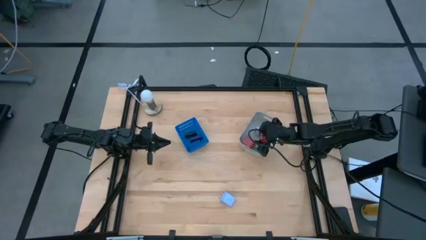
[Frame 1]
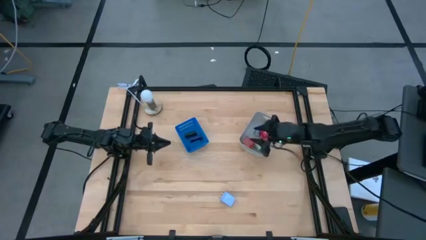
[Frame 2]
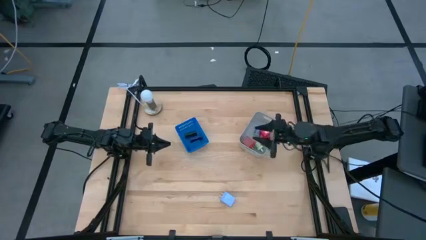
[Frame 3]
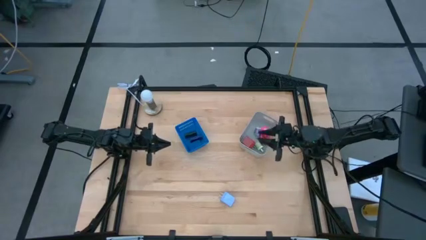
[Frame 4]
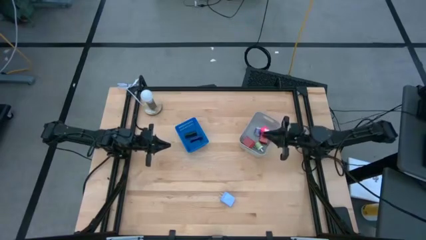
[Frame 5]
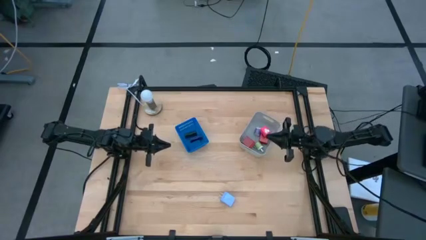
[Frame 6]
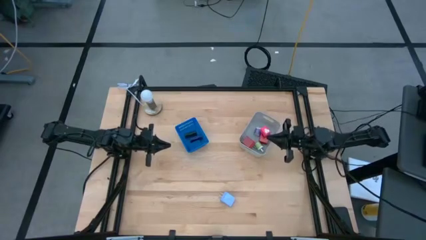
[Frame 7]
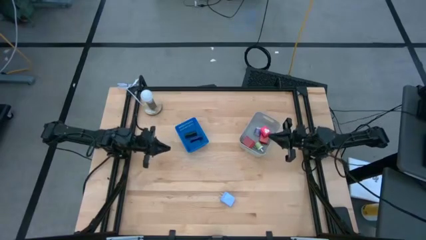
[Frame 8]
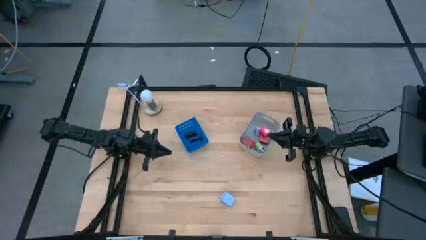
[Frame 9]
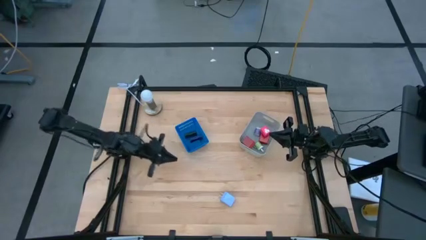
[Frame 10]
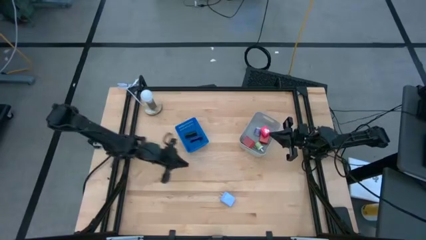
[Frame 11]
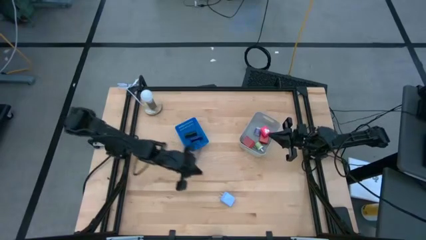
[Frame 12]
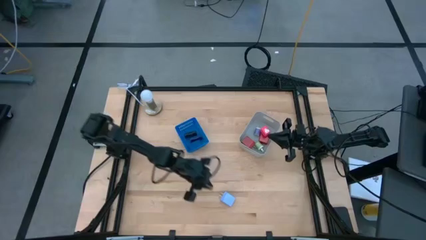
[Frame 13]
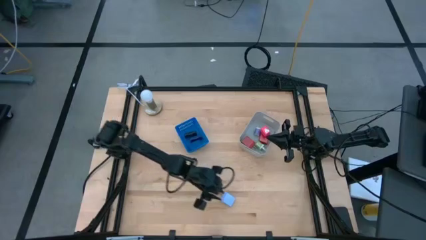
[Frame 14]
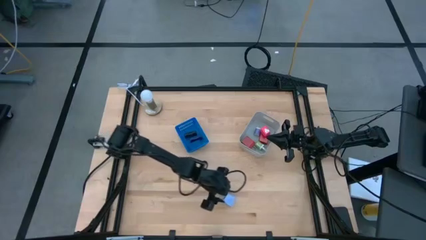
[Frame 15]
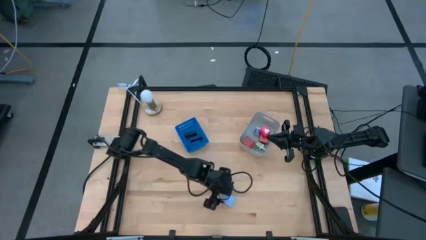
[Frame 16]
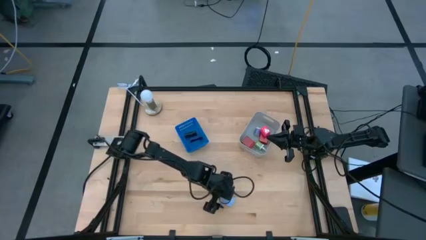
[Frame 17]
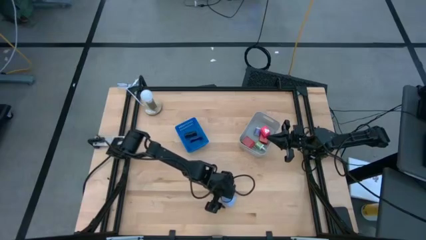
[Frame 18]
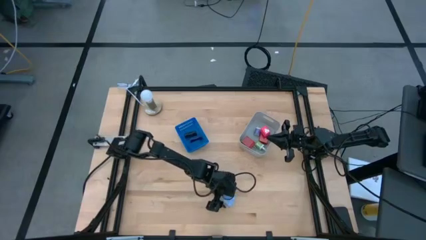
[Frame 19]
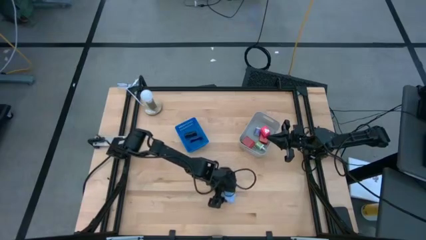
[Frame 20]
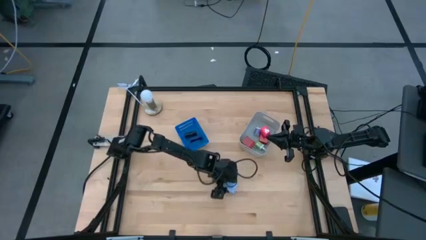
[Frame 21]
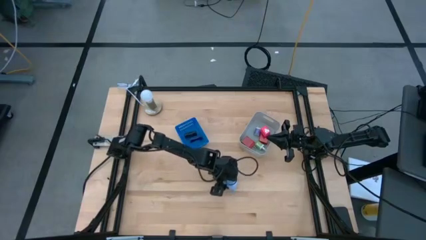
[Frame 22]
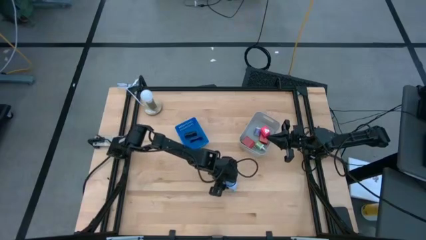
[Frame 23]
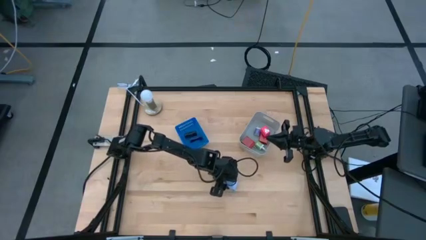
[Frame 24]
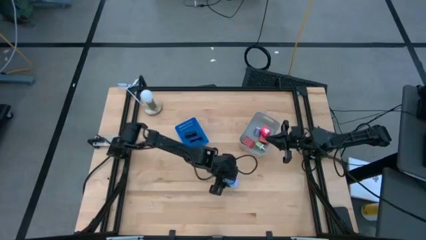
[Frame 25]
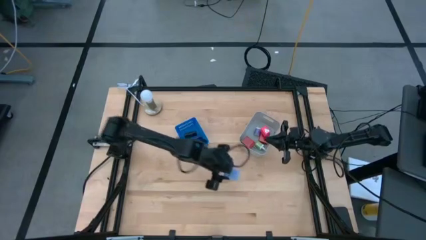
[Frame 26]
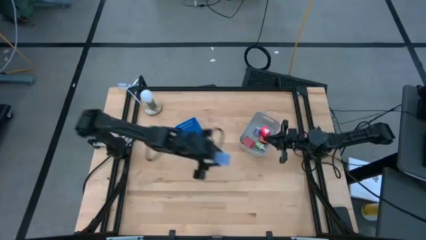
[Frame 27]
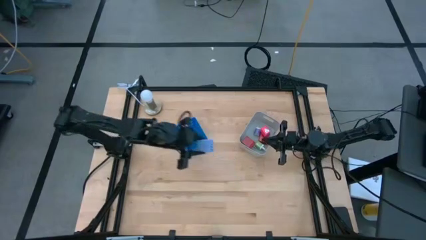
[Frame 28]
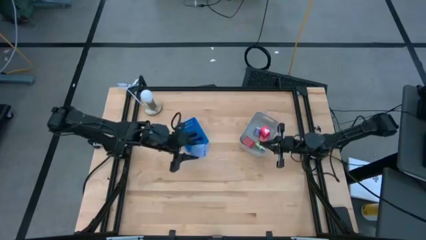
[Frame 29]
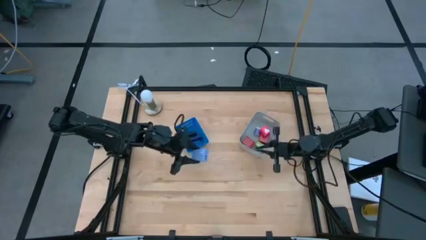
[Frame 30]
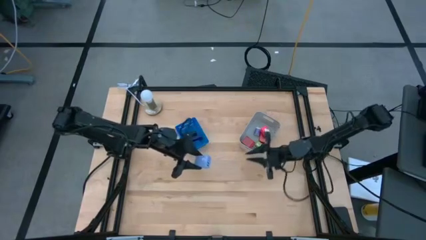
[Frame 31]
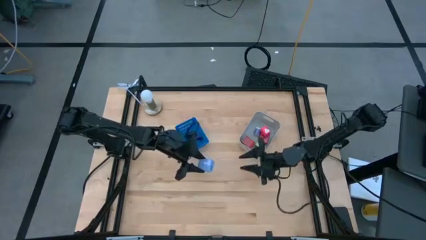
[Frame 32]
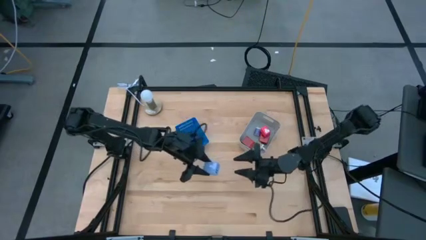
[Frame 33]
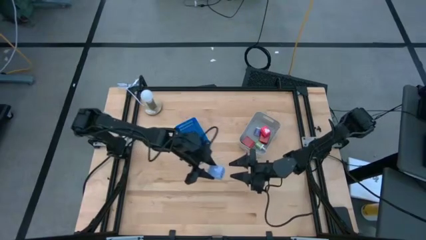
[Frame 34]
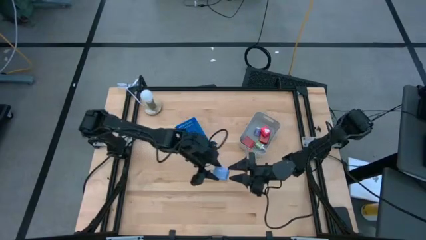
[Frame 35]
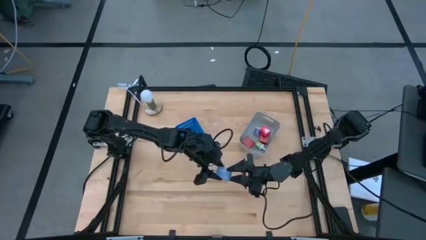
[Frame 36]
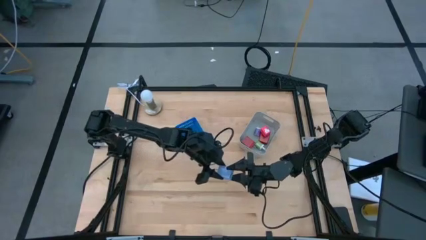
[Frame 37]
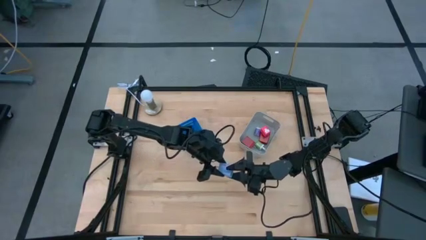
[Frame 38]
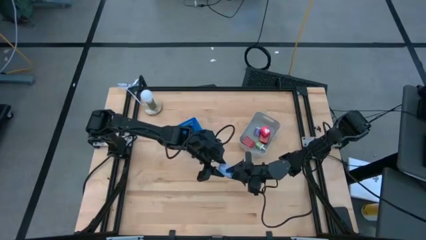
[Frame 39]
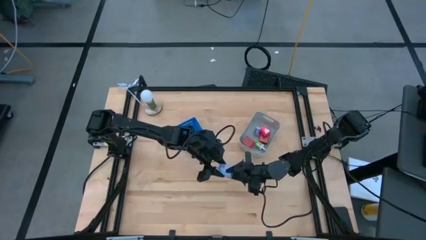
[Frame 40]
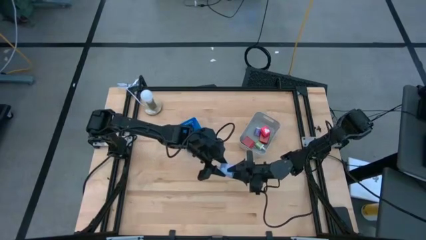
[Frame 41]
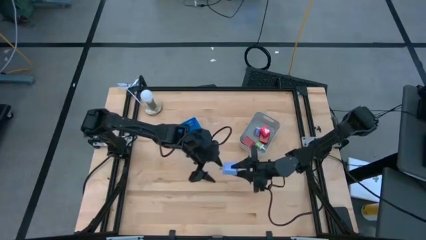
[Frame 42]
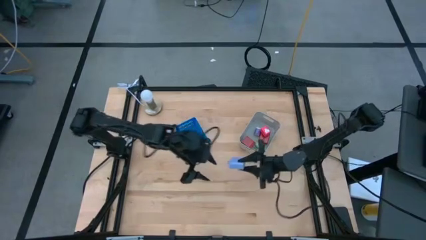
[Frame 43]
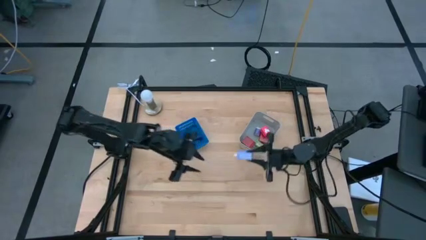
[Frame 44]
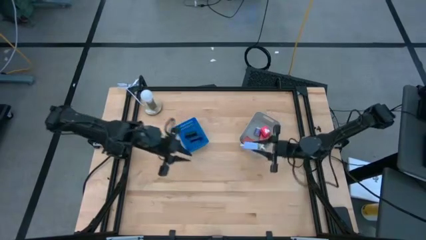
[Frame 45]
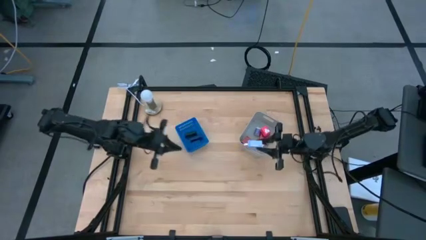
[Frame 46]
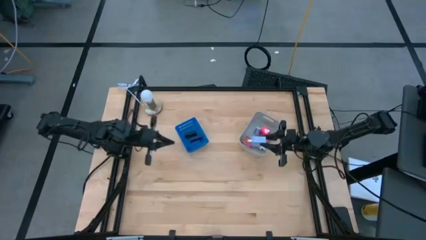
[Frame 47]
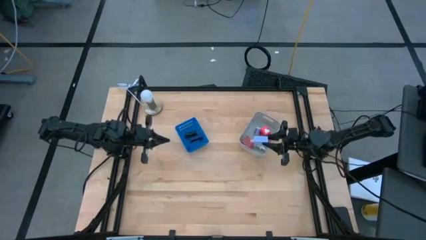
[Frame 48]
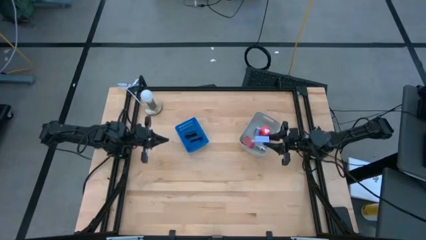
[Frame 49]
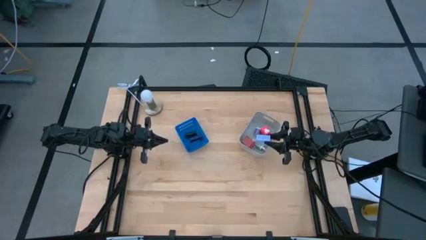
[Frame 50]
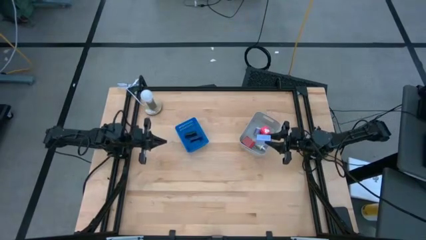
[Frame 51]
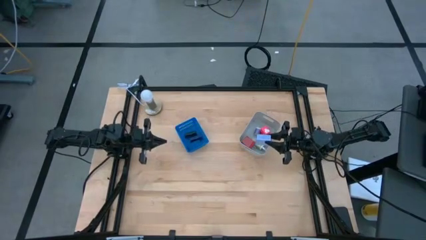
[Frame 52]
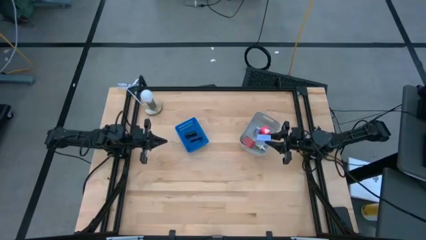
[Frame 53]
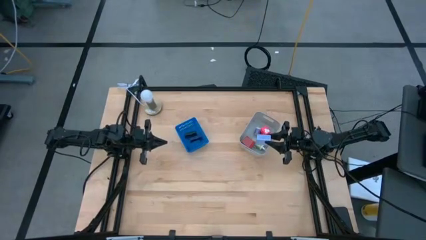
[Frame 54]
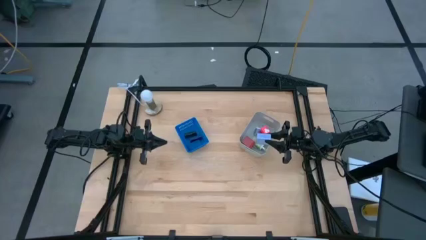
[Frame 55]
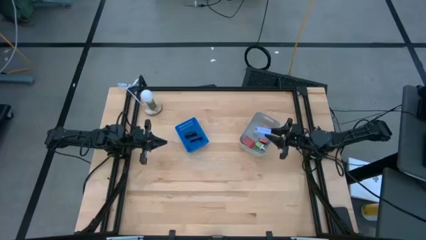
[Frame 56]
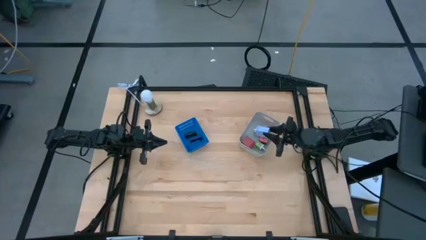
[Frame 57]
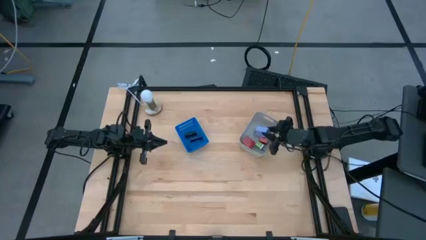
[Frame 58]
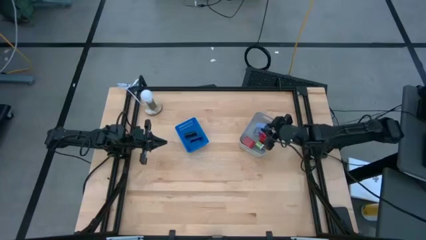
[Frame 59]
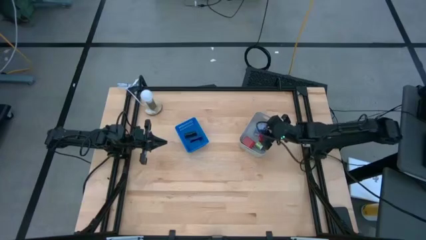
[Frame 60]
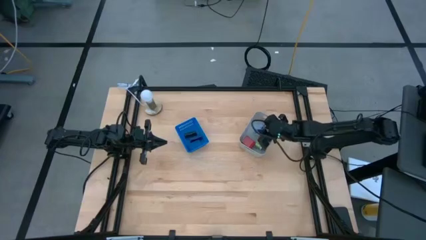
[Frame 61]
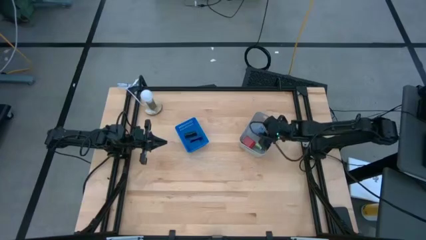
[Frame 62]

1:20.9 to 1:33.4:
Task: Pick & Place Office items
Put the blue charger adapter into the gray bin

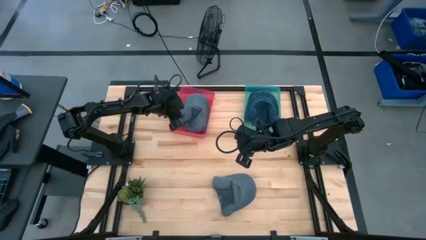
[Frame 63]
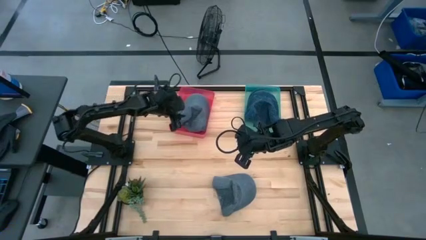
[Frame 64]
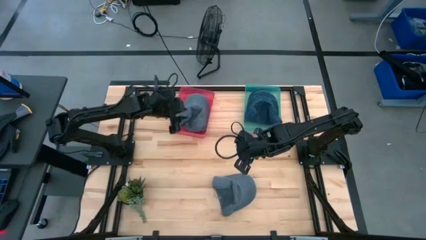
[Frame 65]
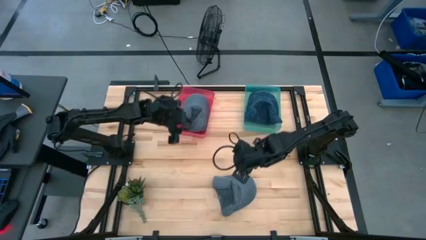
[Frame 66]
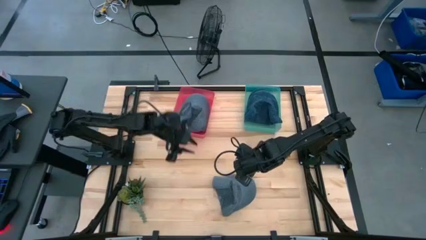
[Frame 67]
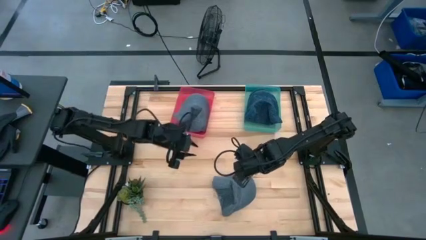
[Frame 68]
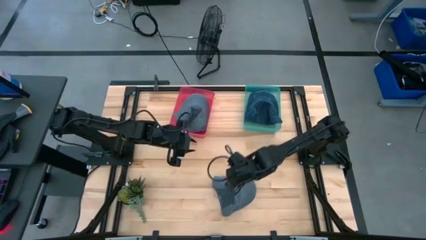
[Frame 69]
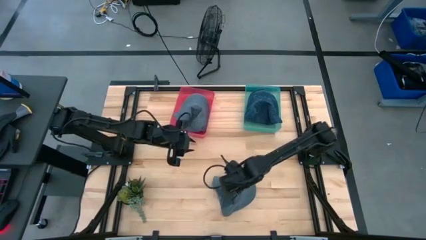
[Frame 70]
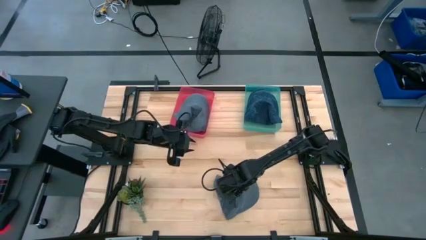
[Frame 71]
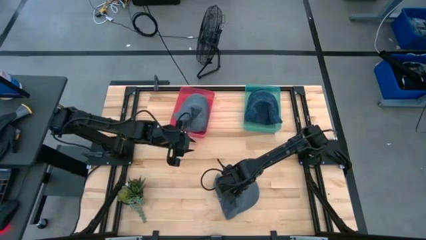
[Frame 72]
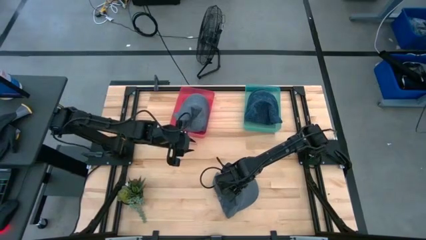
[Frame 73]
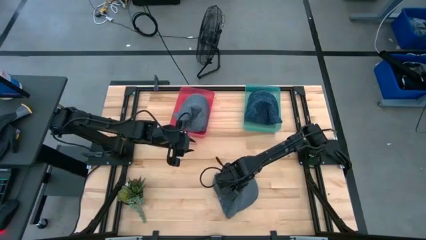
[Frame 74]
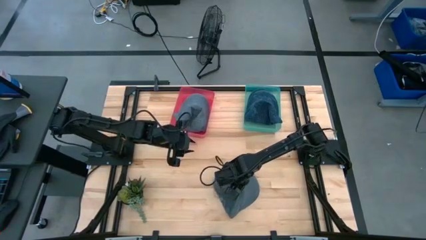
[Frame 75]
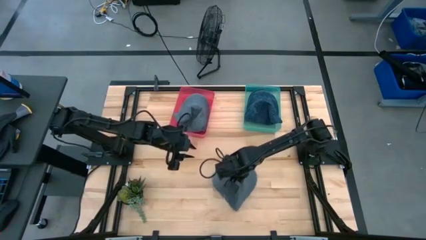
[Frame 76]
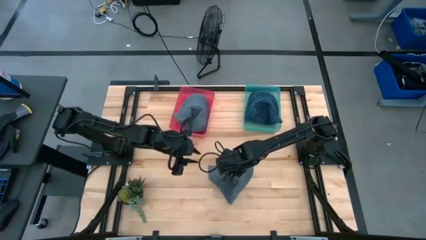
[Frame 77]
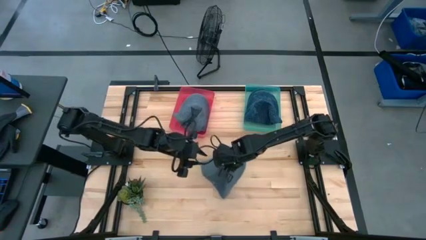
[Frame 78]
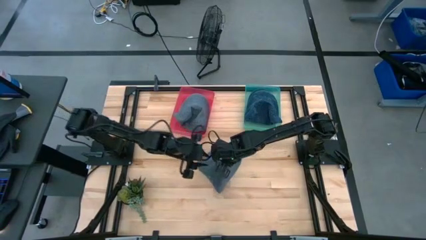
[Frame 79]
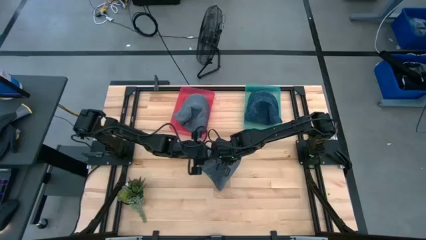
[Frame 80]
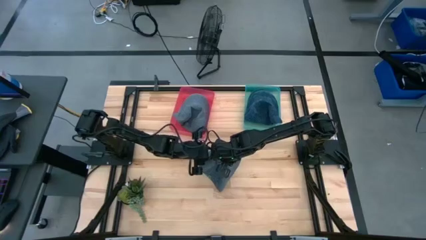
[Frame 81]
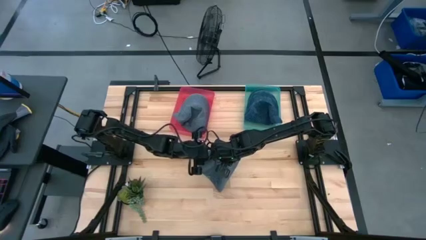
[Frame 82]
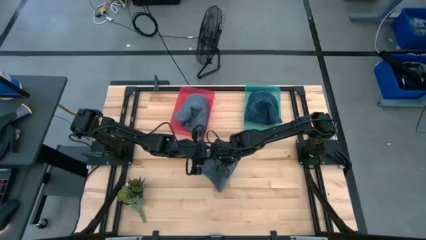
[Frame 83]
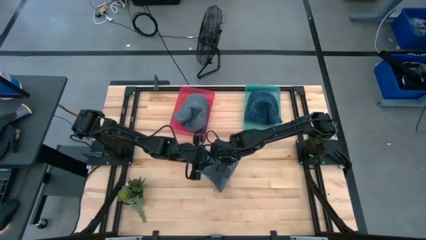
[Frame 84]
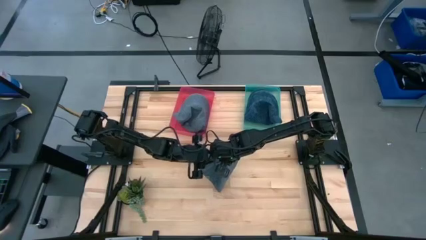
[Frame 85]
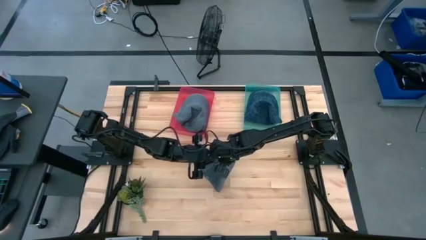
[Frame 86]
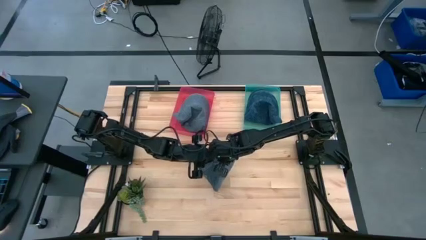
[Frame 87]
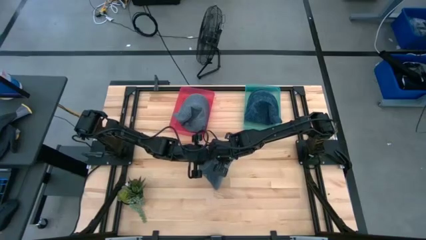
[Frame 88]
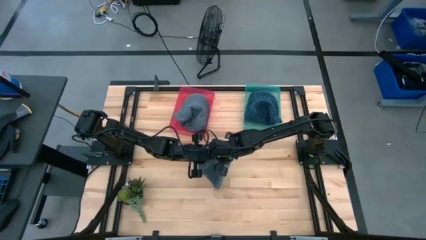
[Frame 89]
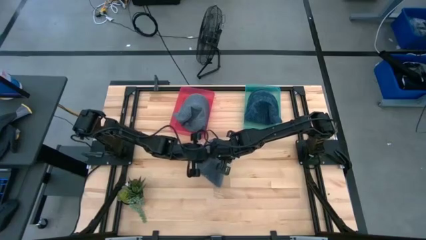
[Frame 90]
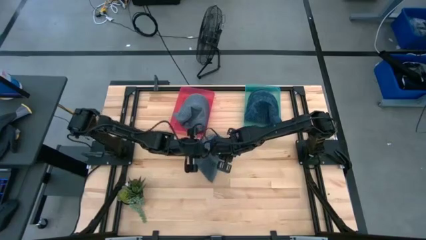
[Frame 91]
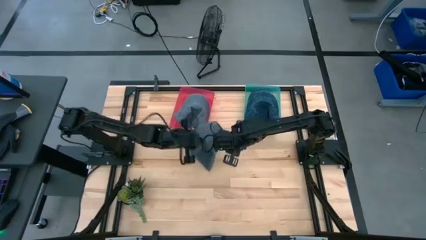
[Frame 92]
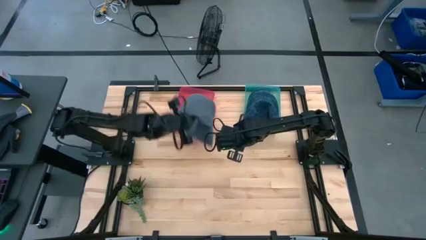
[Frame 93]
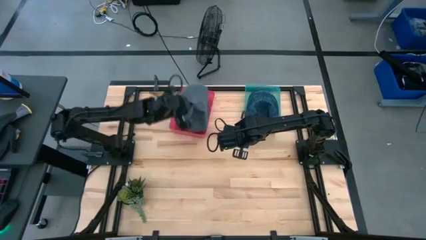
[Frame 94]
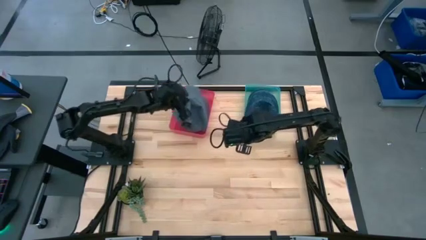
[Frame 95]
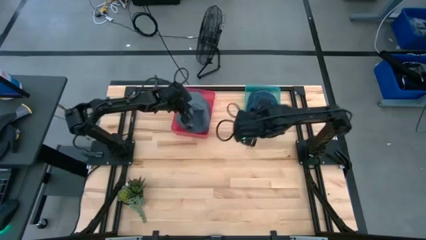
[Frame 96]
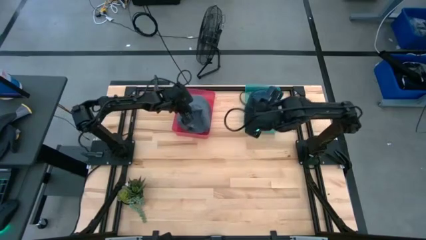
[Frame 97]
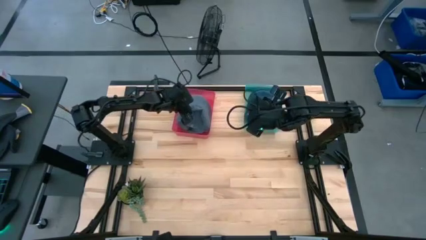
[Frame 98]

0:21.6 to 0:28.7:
Task: Pick & Place hat
Put the gray cap into the red bin
